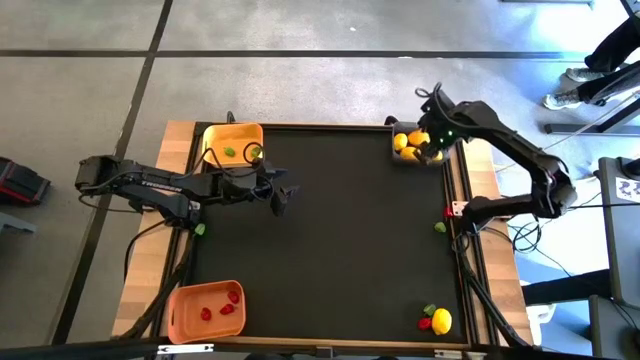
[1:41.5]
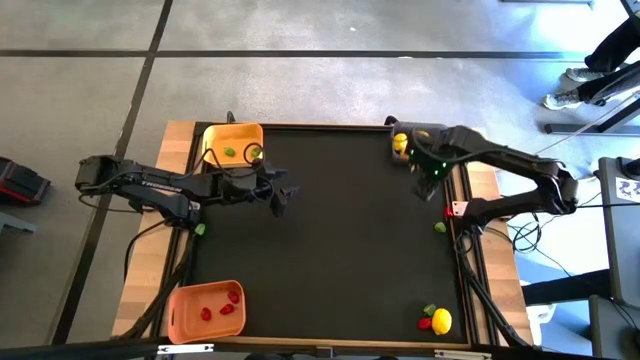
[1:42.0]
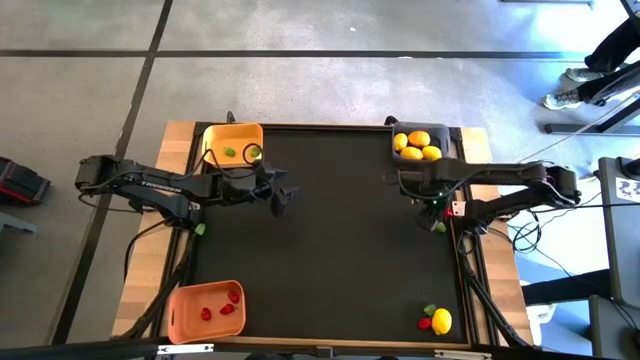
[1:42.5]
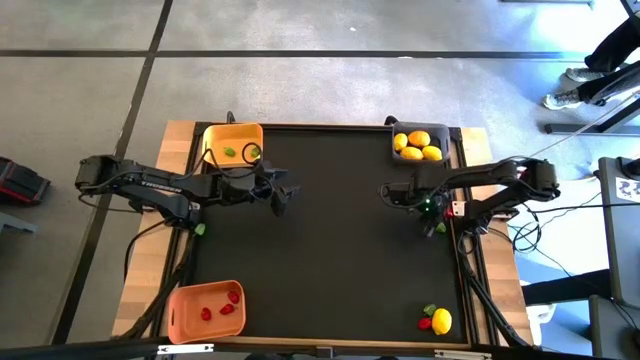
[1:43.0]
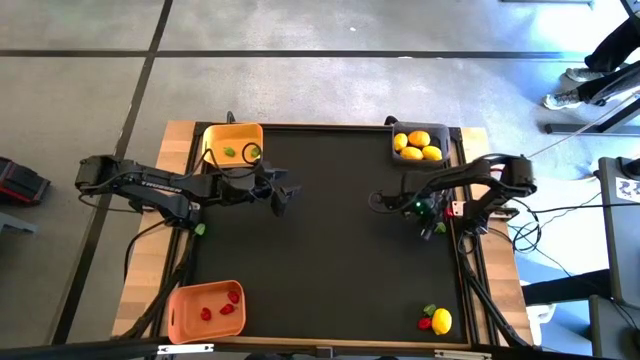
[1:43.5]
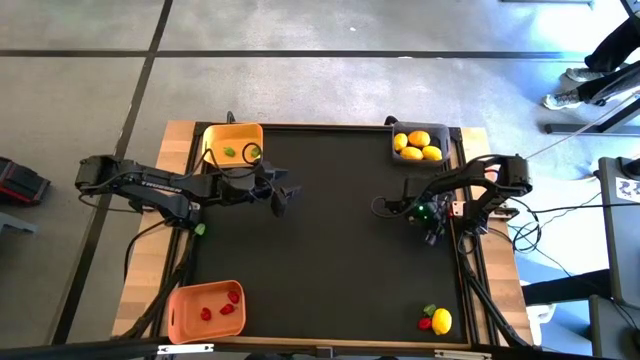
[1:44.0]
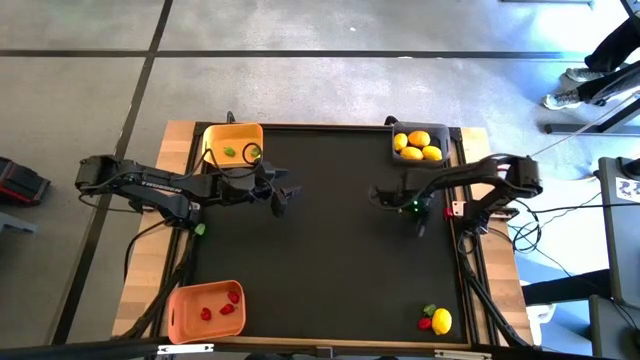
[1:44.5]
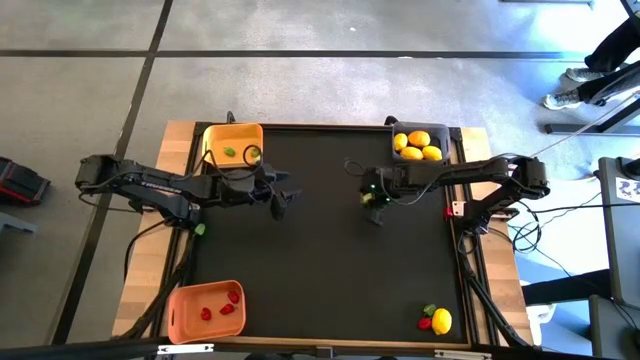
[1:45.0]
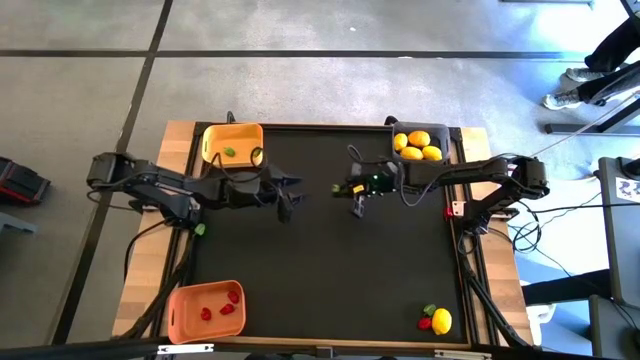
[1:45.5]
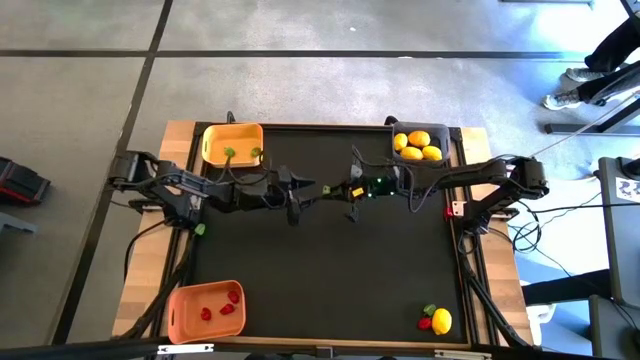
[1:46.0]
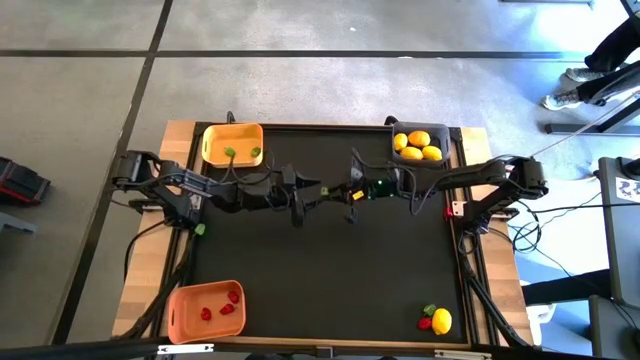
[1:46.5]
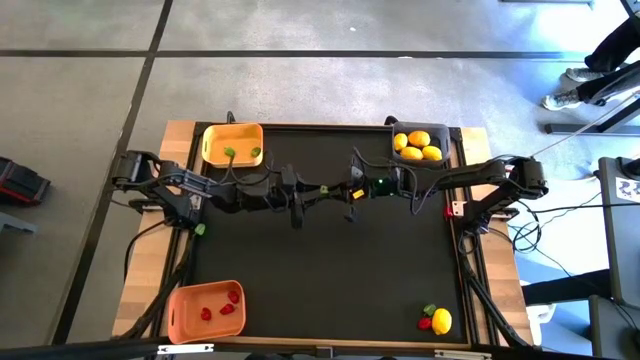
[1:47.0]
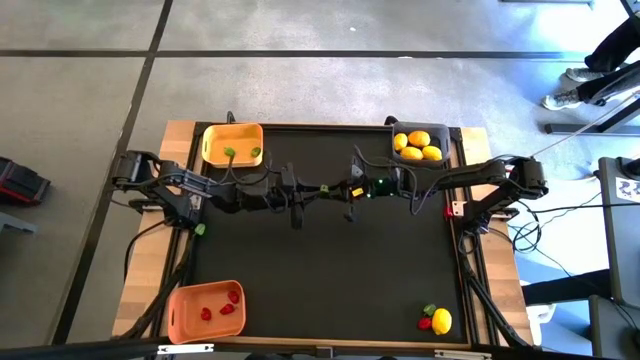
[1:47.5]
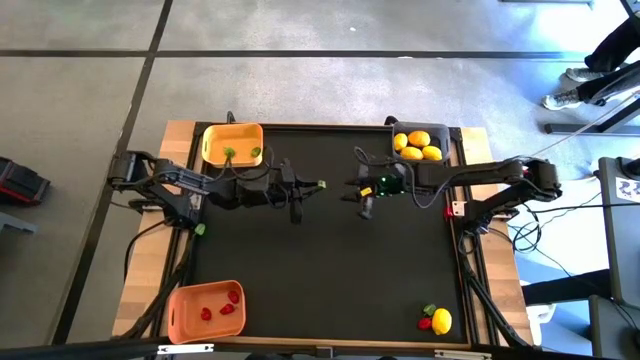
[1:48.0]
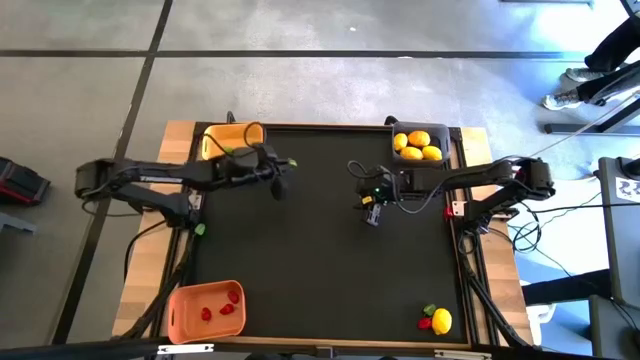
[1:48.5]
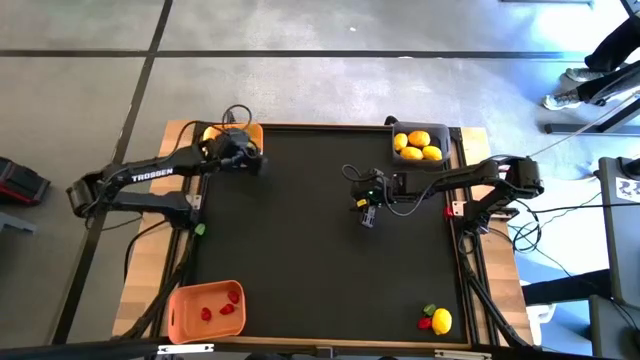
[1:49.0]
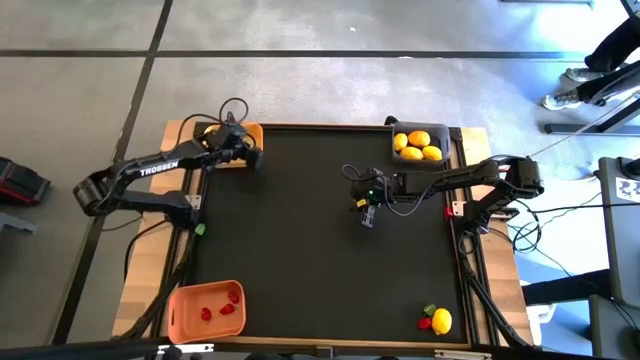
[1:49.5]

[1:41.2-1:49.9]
Task: Sort produce into baskets
Put the green bell pepper into the yellow bin

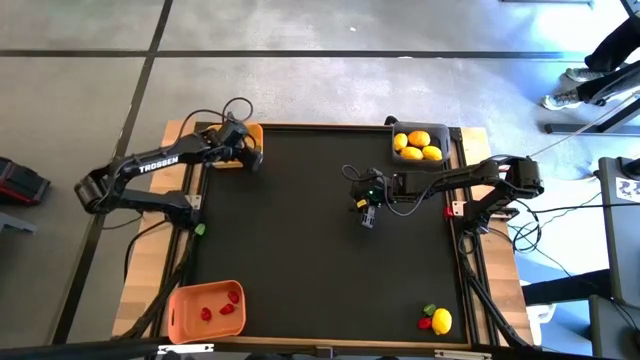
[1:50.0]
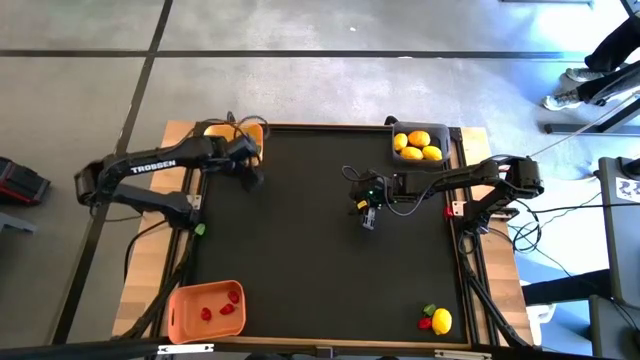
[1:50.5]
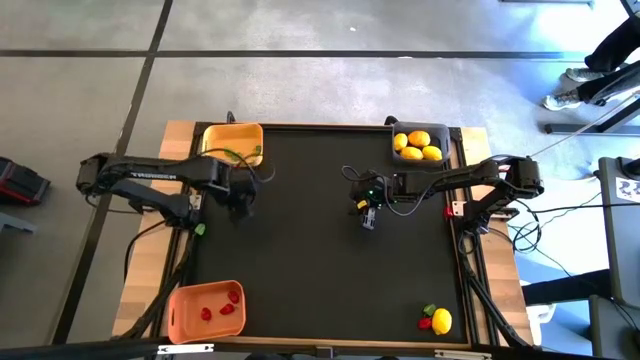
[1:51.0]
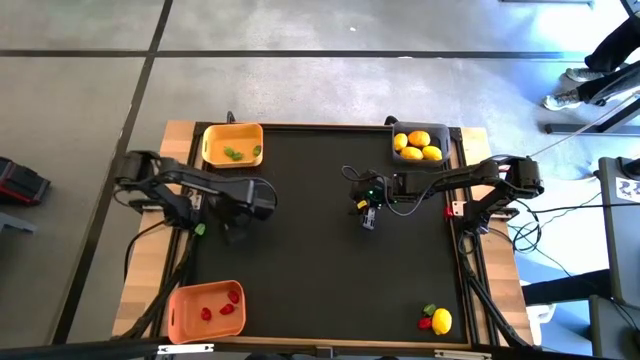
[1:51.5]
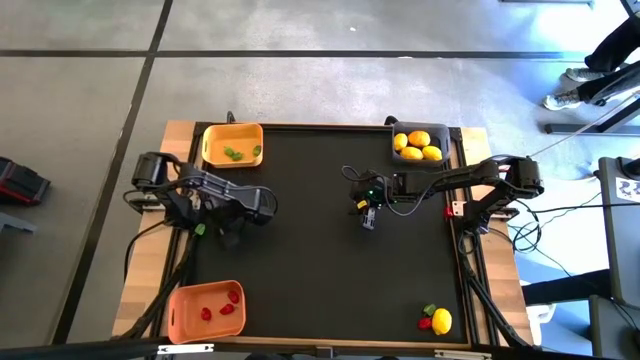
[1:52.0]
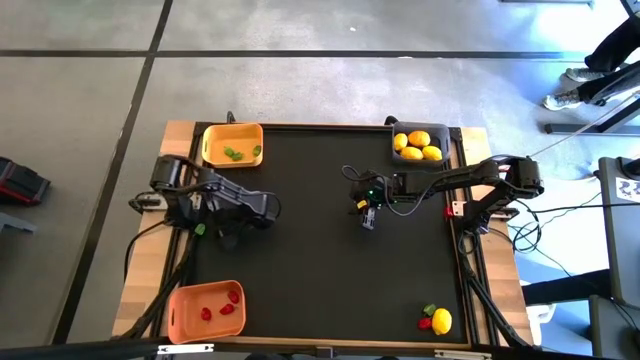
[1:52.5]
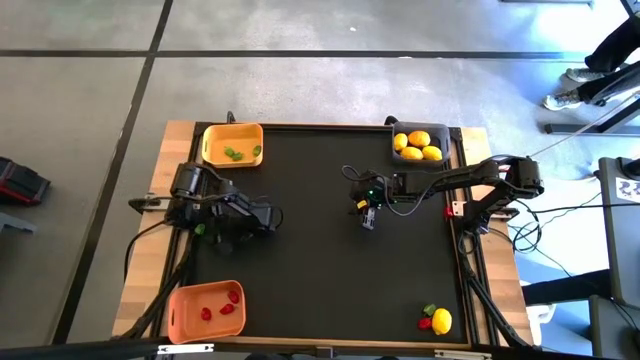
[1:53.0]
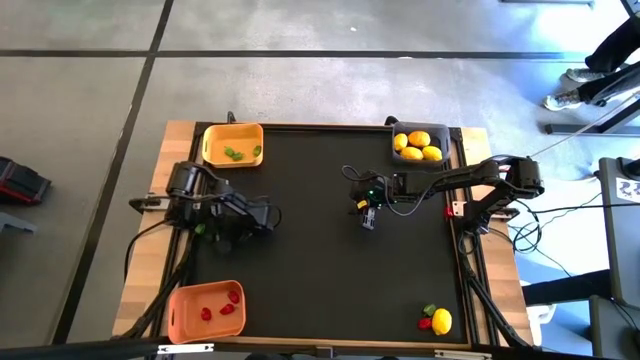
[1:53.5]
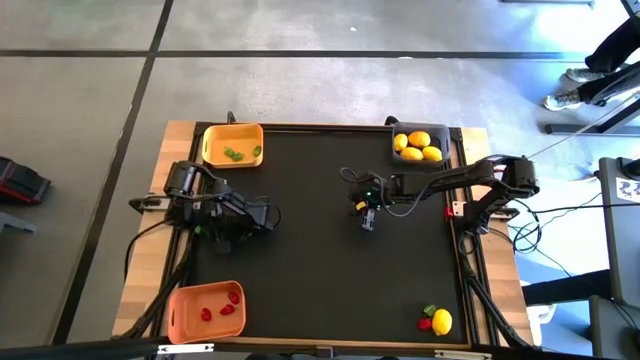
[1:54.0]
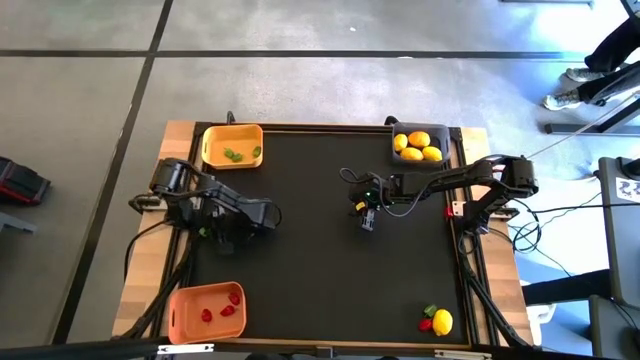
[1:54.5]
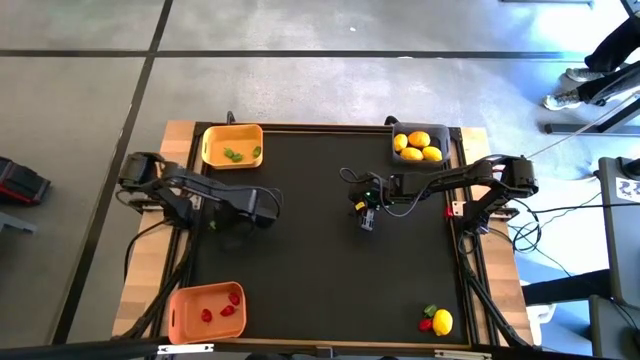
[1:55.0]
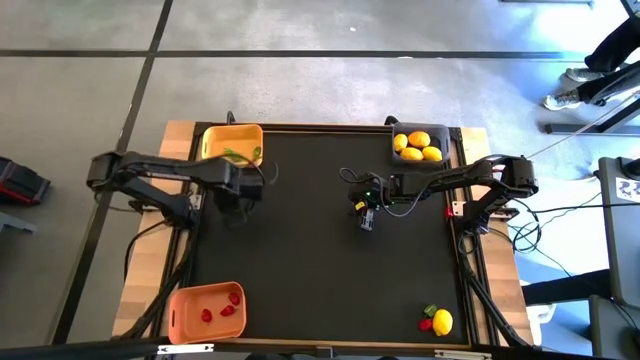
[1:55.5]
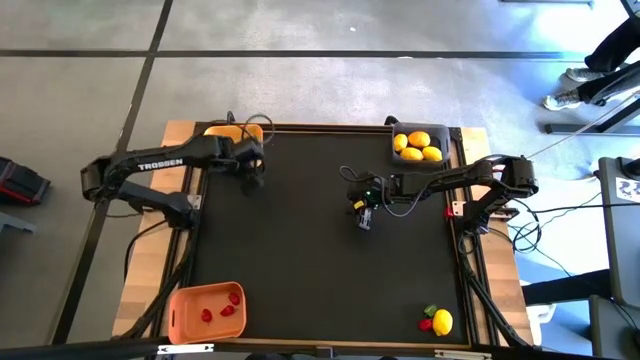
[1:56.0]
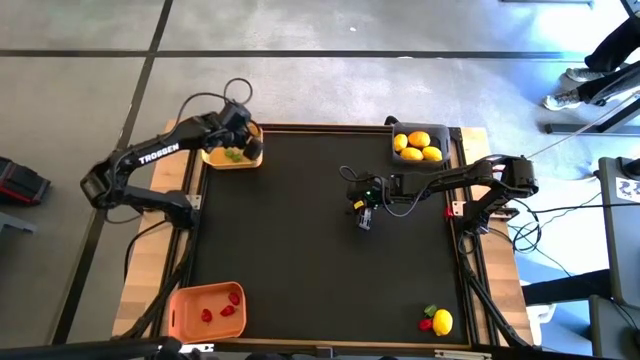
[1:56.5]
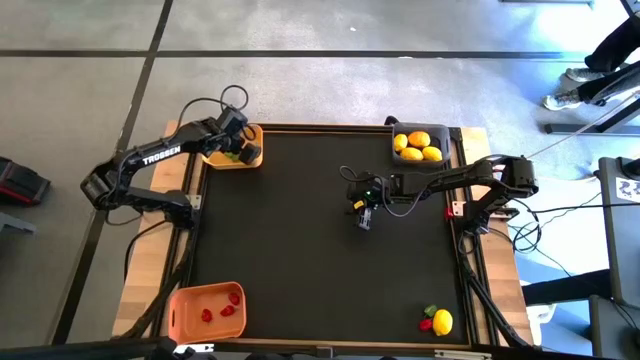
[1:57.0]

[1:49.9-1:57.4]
Put the green bell pepper into the yellow bin

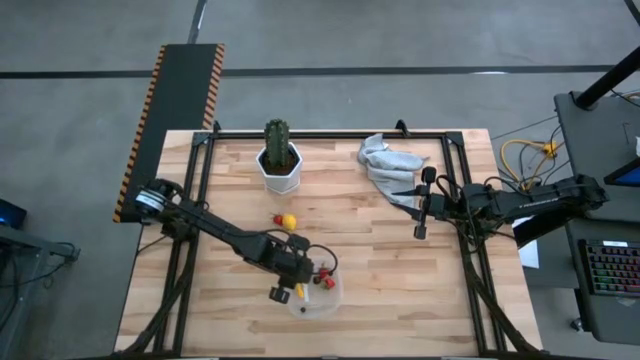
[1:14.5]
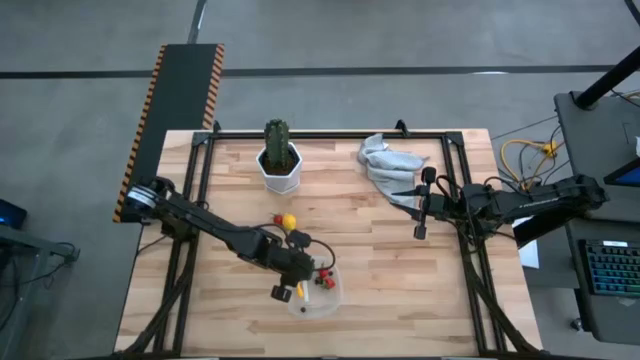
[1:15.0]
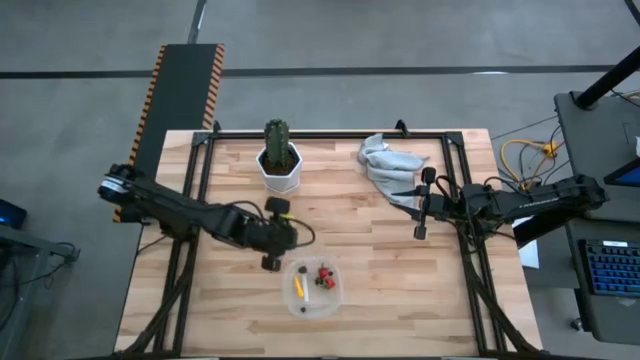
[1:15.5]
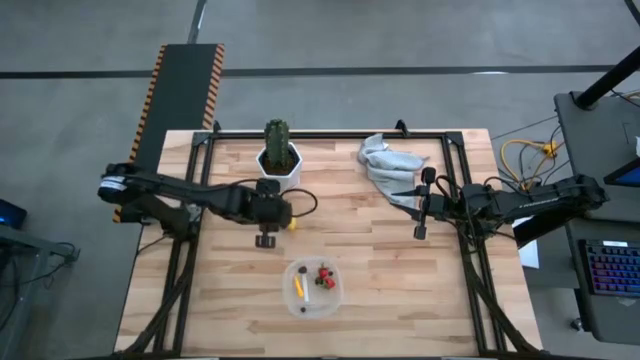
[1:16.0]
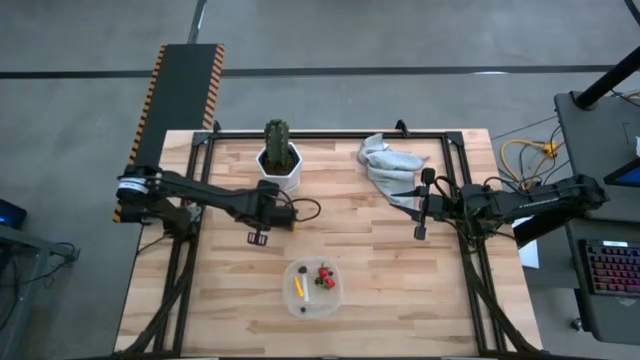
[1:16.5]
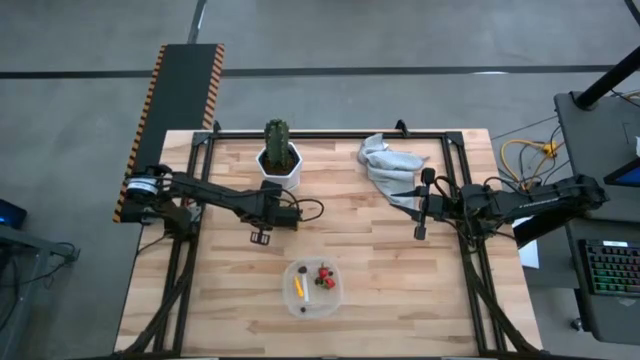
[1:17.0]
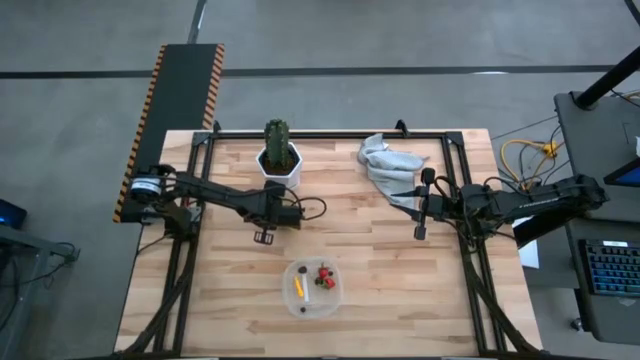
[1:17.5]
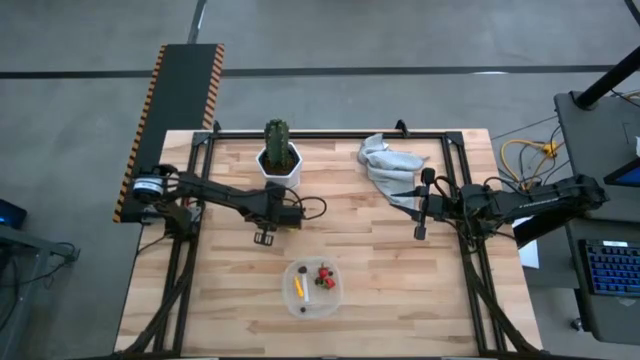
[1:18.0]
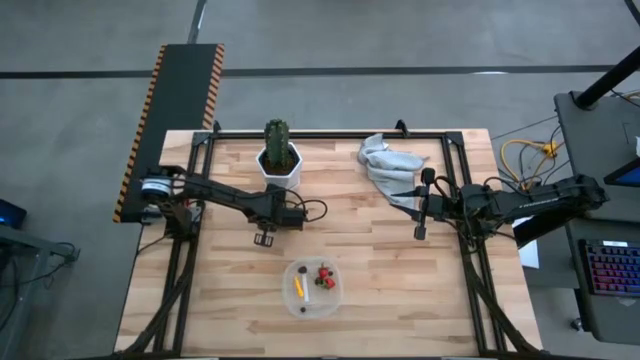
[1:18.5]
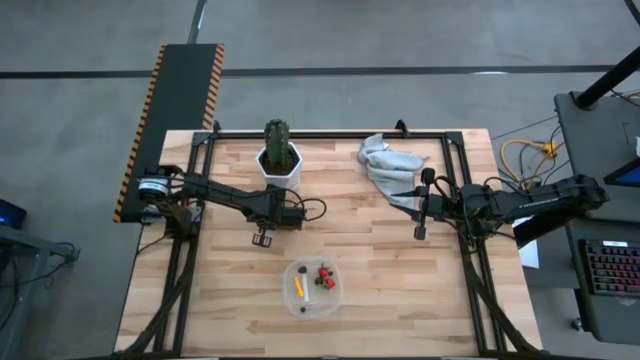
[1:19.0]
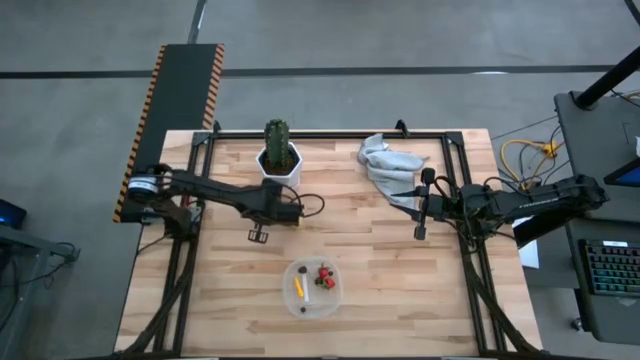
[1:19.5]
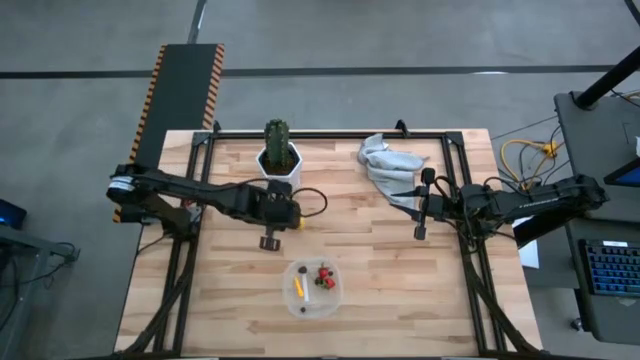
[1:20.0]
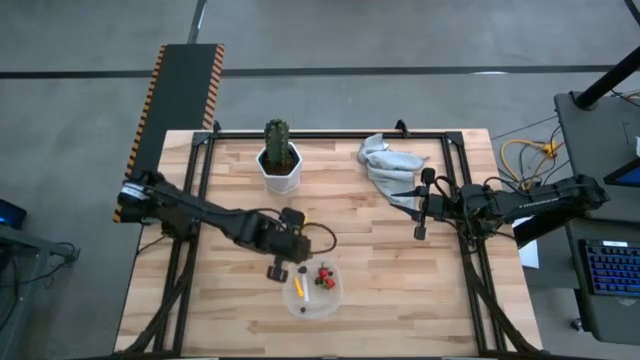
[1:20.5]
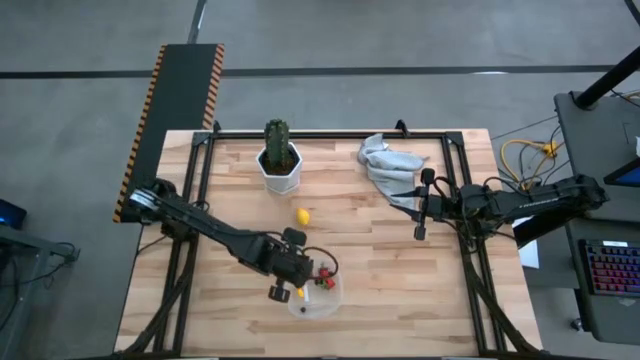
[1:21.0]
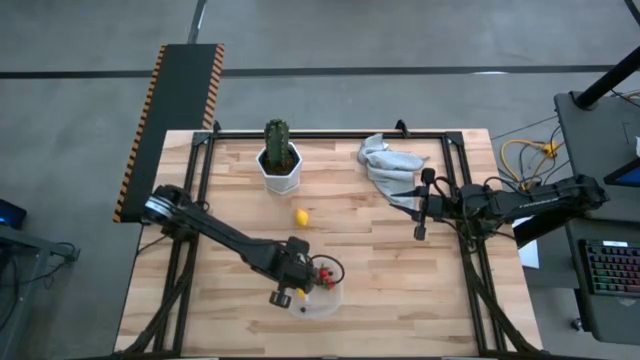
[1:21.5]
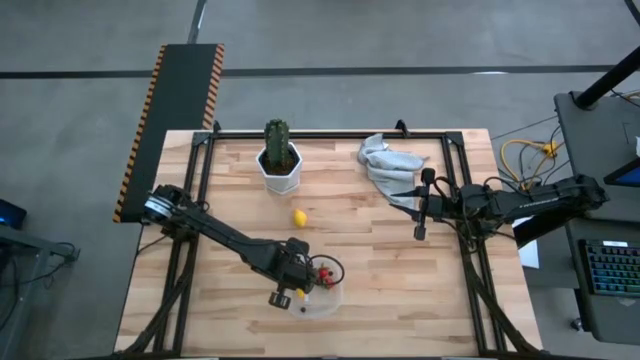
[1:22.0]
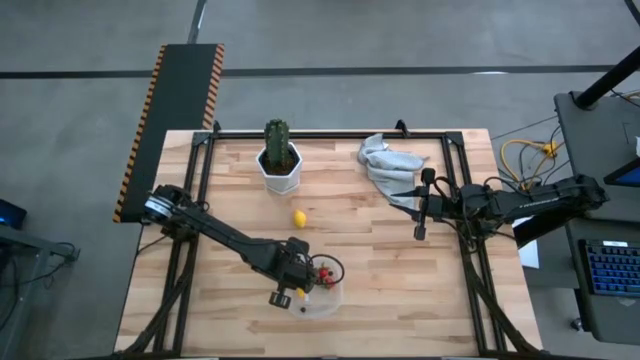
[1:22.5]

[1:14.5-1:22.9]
Task: Pick and placing Produce into tupperware
Put the red strawberry into the transparent container
